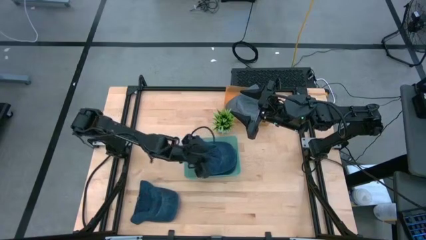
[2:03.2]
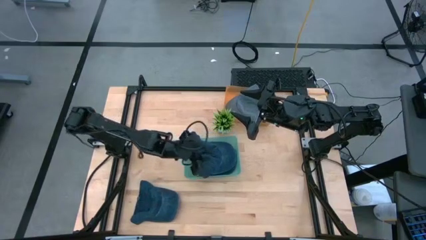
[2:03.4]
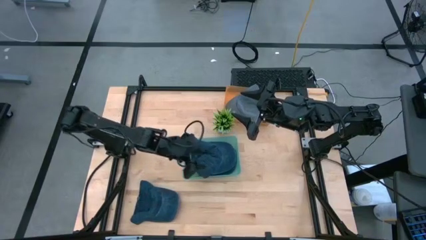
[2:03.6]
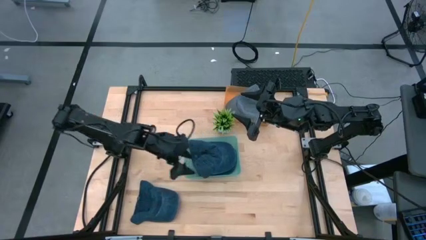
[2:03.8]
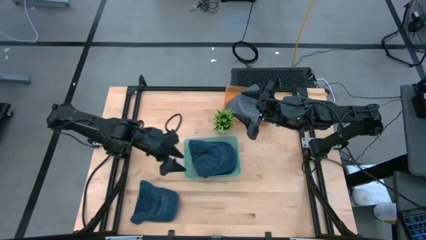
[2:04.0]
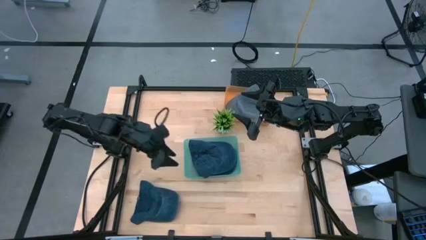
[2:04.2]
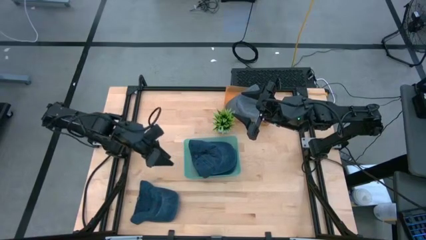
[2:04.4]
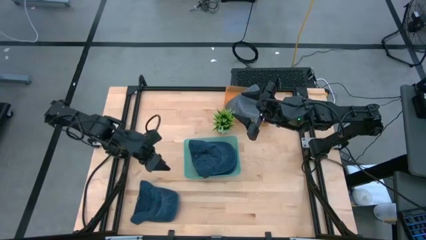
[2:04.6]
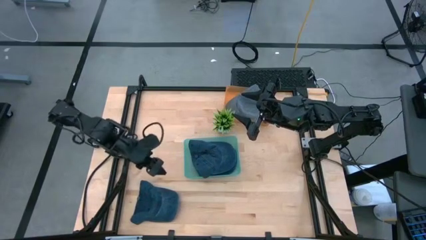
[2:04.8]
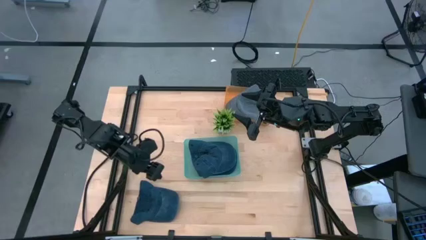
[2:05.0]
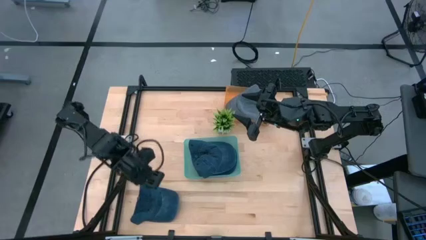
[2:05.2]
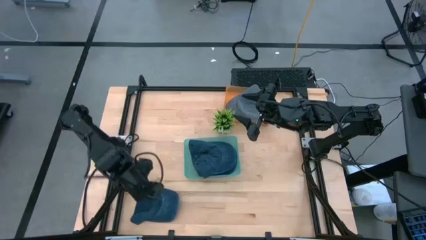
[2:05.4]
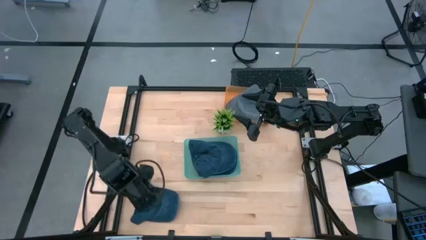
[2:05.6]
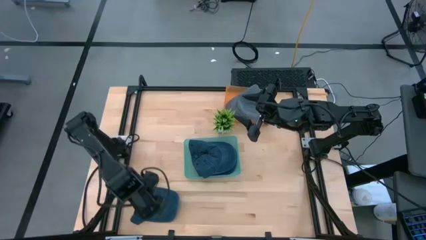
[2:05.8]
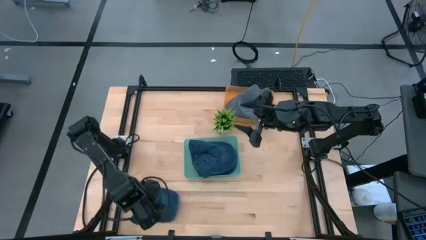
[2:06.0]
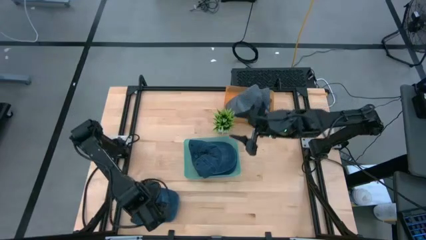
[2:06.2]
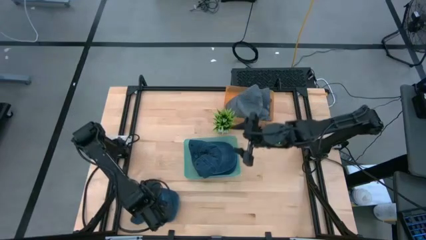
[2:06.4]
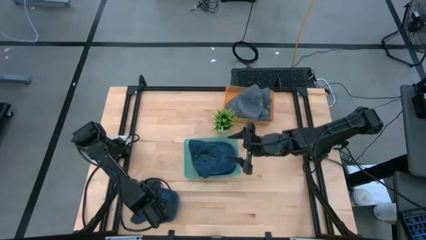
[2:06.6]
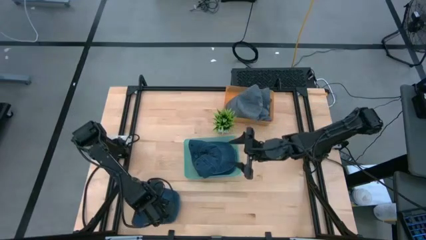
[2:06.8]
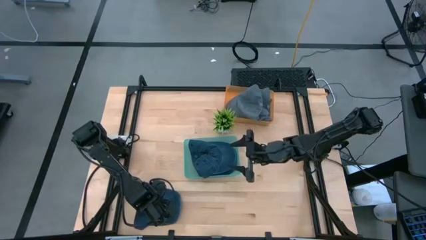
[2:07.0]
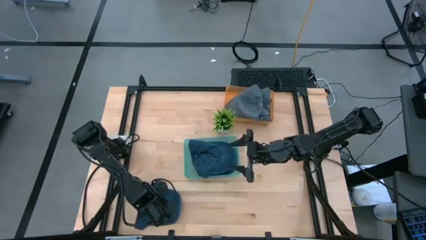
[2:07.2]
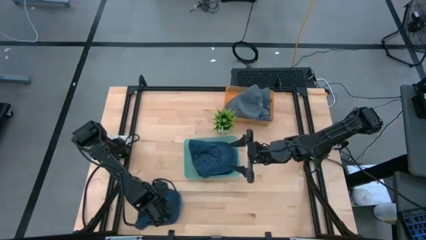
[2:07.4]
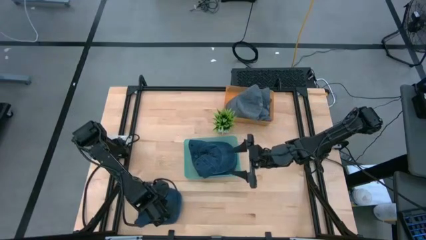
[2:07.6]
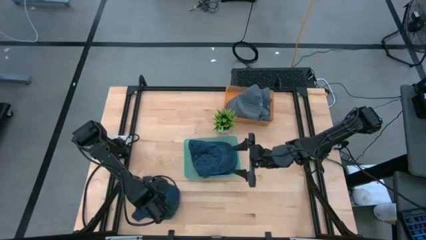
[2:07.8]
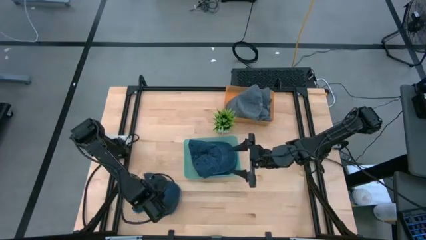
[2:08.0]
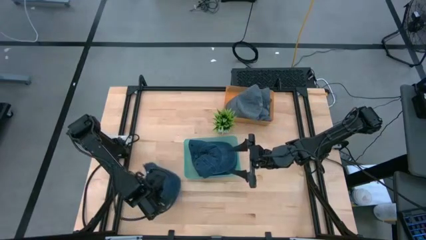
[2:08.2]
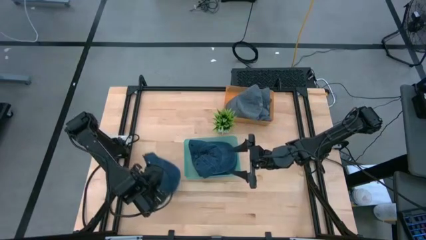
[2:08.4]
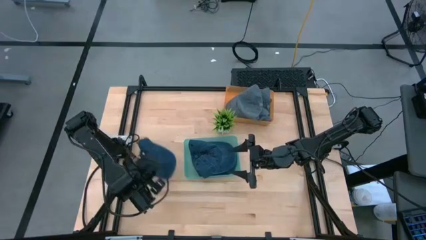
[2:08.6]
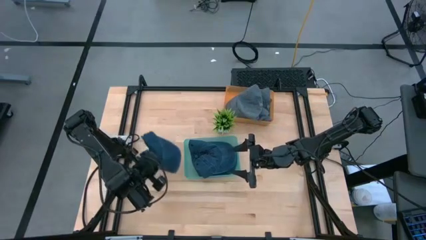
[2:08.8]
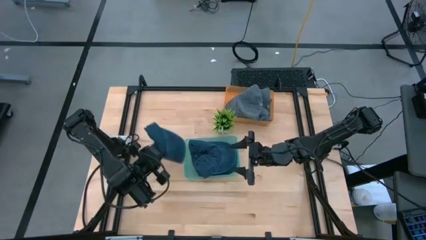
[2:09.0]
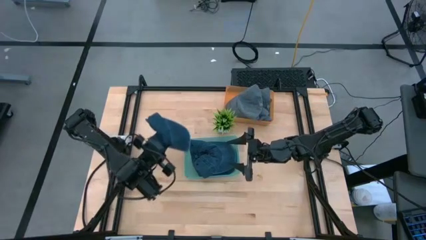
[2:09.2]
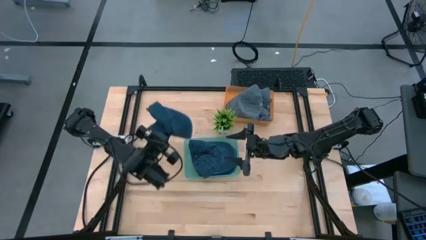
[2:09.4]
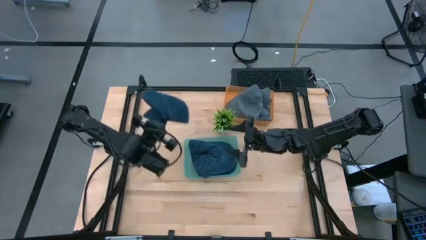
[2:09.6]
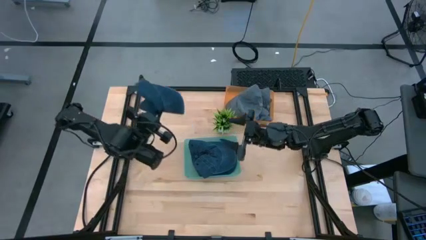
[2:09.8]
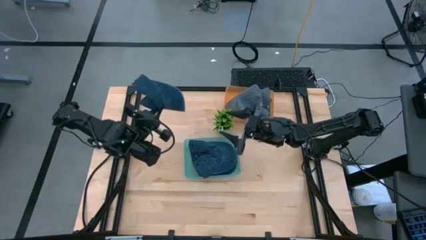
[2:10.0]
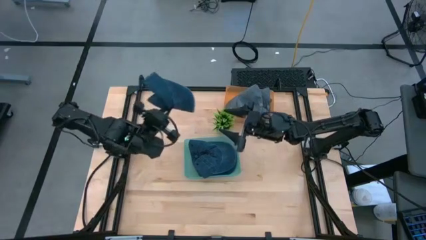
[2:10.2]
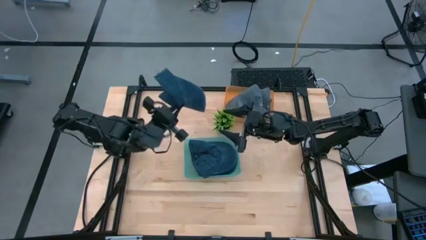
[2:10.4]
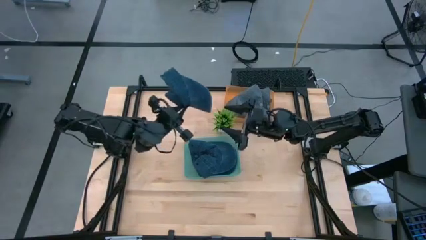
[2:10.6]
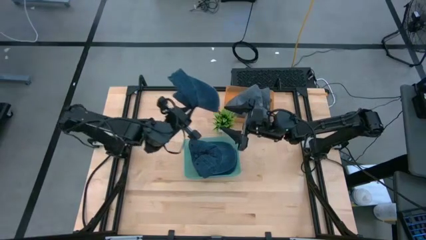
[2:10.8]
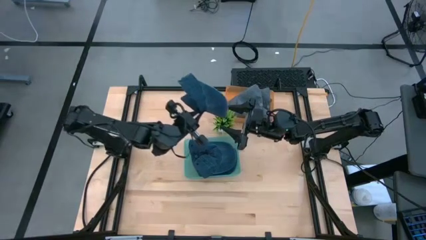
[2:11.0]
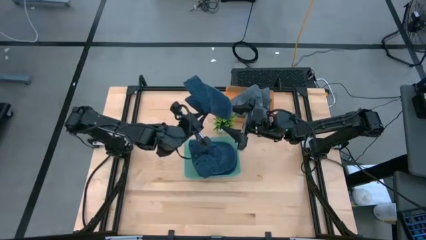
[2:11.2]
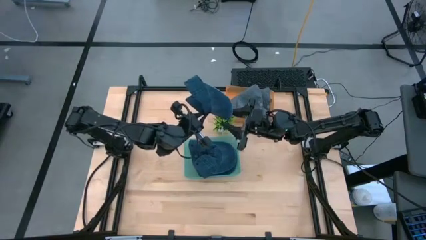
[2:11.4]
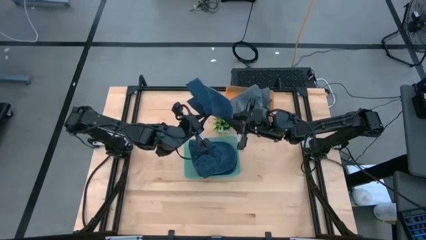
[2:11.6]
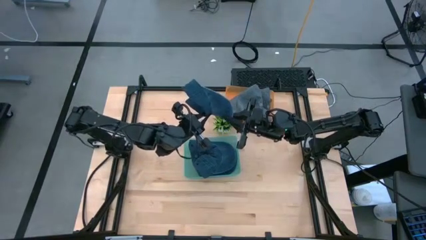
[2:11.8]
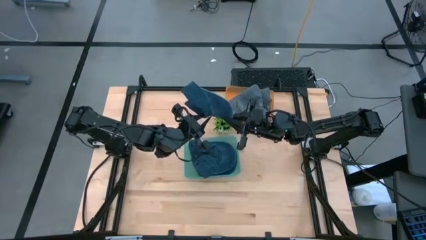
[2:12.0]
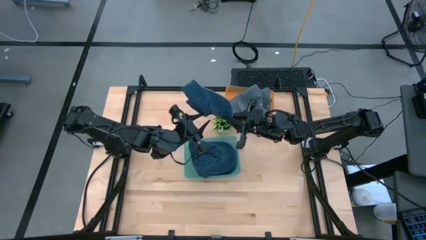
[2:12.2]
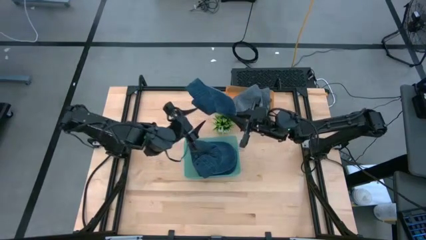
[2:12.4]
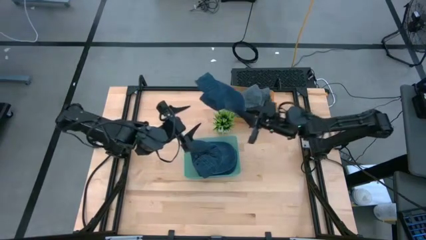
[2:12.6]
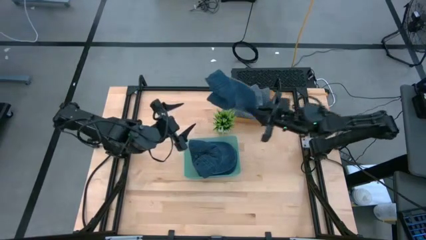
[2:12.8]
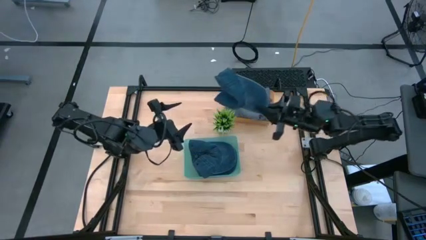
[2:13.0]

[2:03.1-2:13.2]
Task: Pick & Place hat
Put the blue cap into the green bin

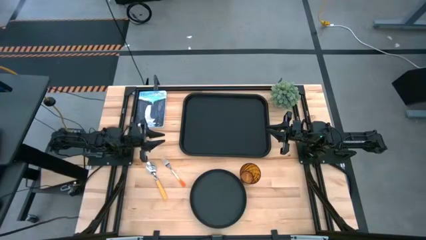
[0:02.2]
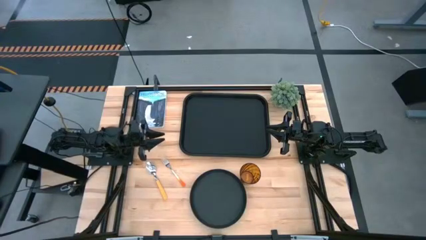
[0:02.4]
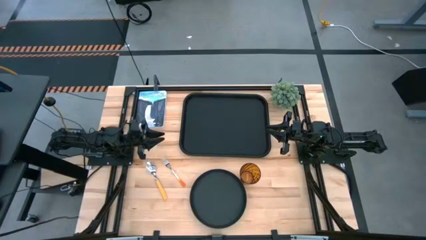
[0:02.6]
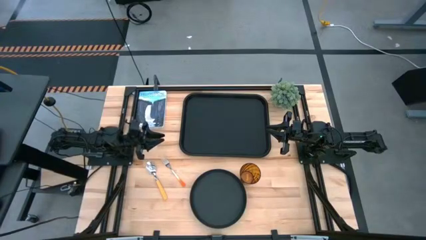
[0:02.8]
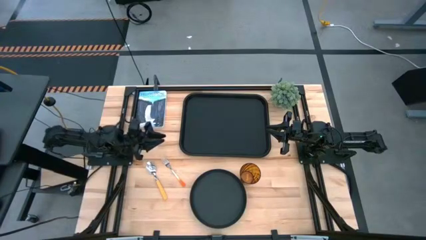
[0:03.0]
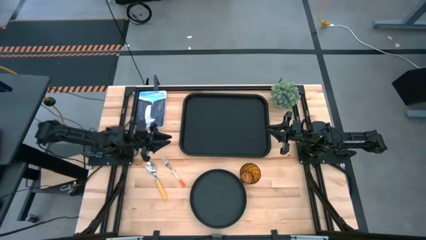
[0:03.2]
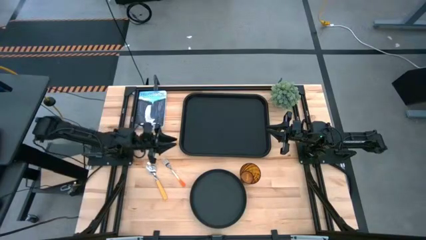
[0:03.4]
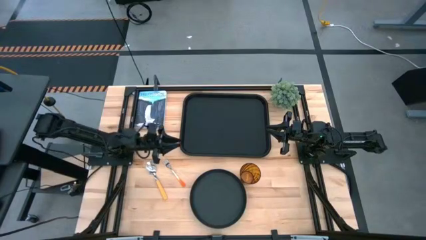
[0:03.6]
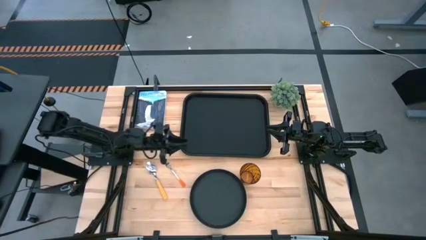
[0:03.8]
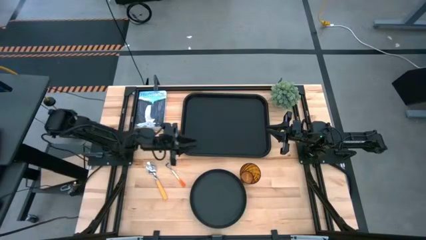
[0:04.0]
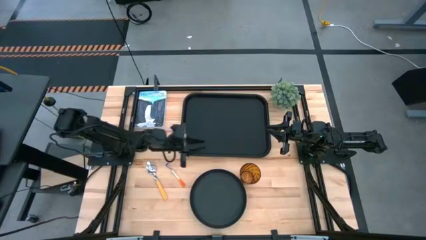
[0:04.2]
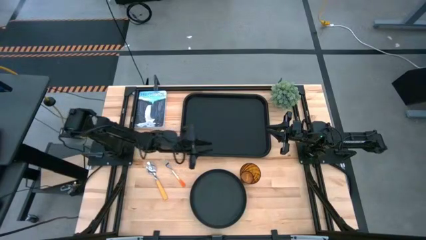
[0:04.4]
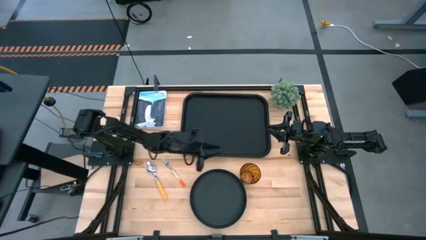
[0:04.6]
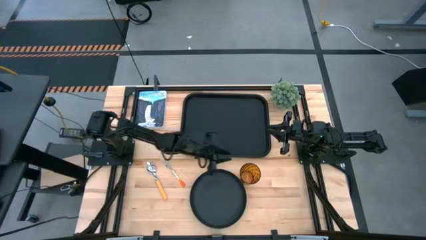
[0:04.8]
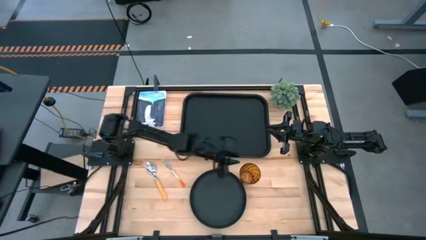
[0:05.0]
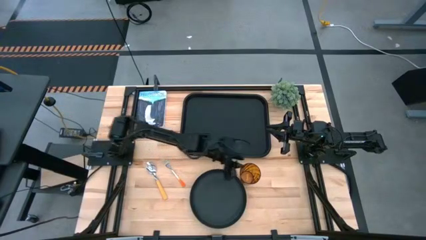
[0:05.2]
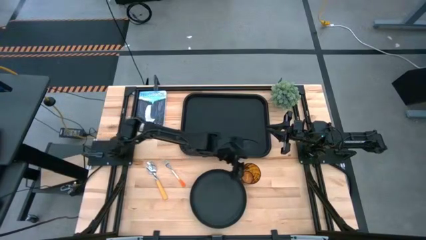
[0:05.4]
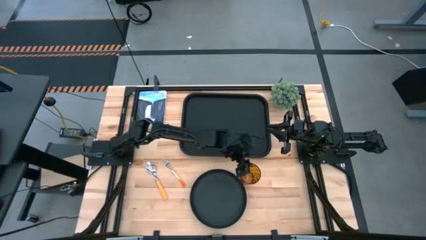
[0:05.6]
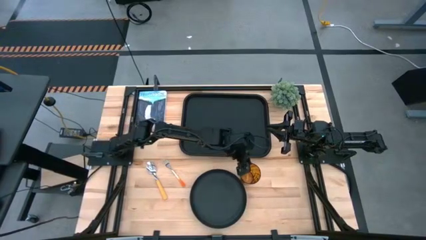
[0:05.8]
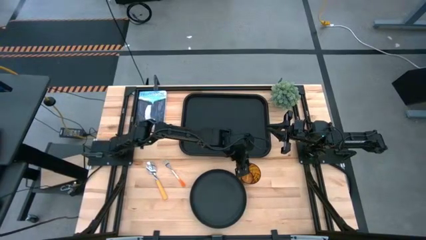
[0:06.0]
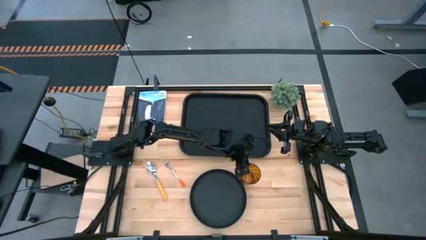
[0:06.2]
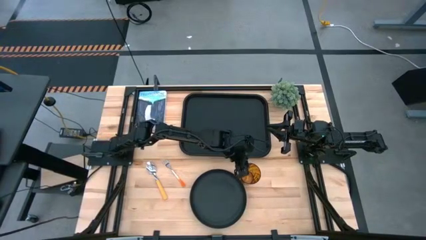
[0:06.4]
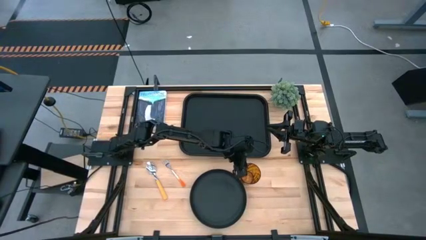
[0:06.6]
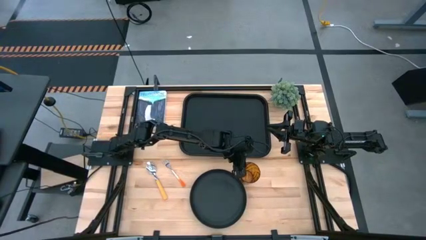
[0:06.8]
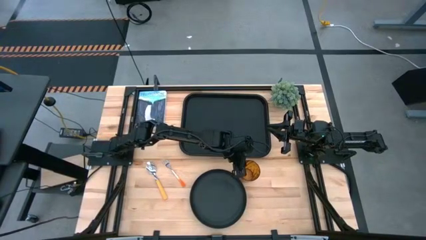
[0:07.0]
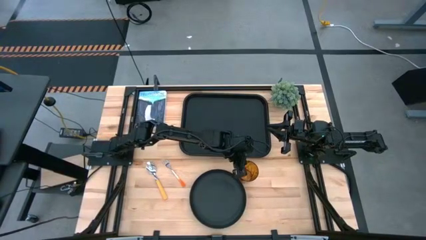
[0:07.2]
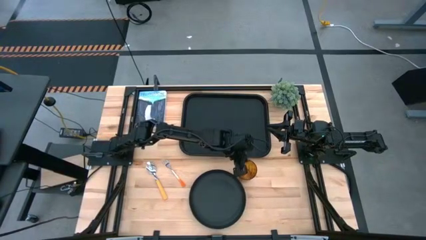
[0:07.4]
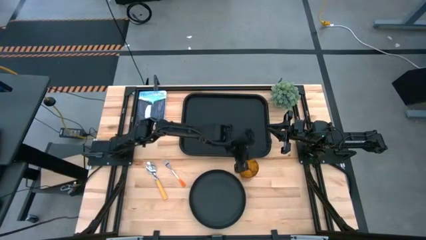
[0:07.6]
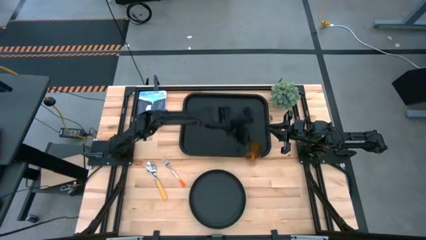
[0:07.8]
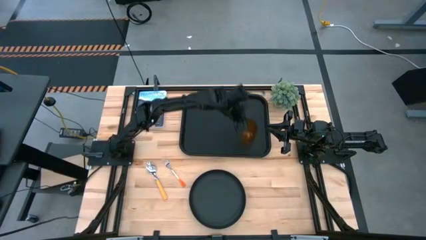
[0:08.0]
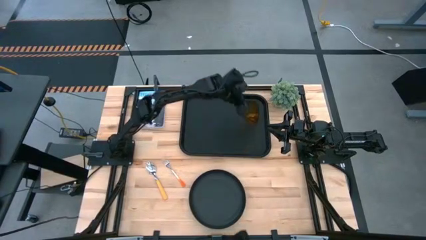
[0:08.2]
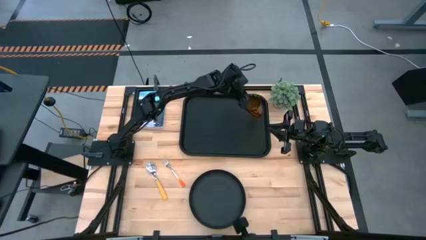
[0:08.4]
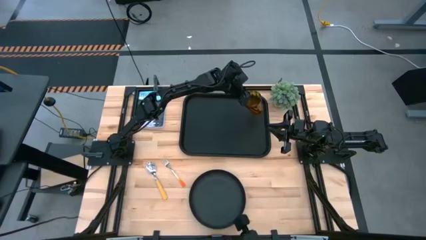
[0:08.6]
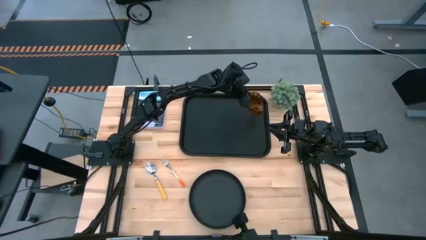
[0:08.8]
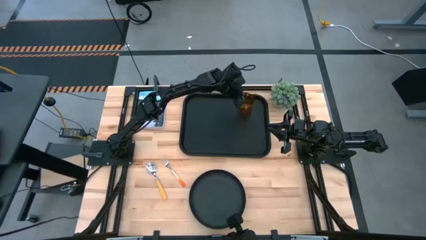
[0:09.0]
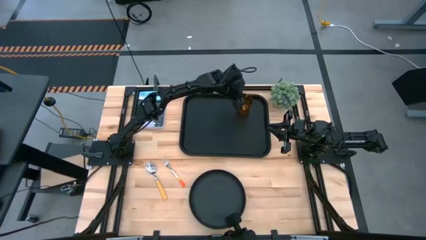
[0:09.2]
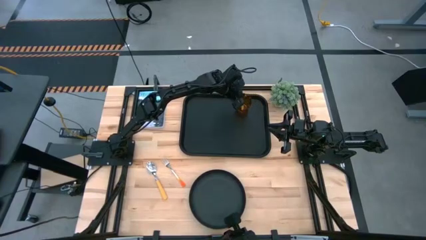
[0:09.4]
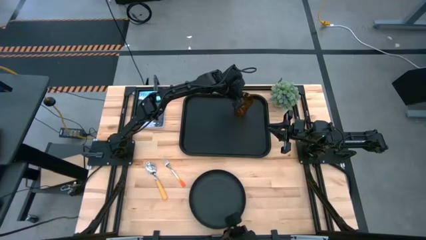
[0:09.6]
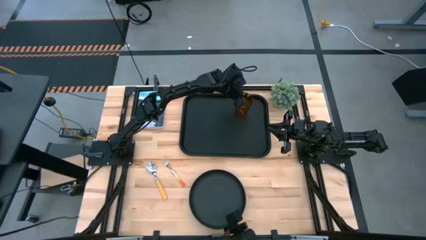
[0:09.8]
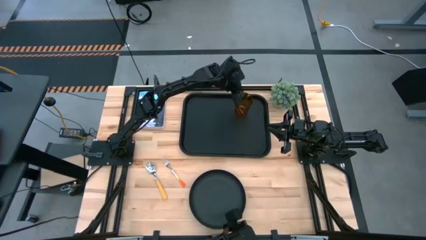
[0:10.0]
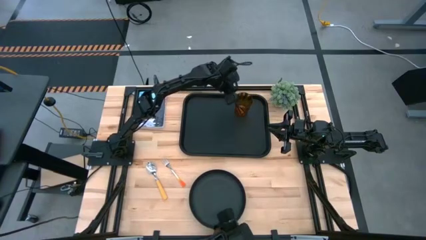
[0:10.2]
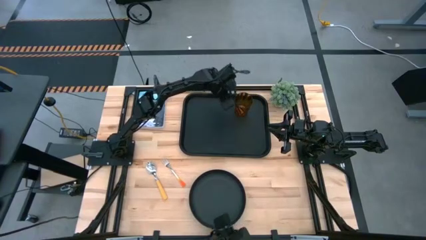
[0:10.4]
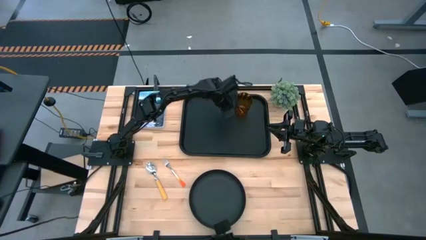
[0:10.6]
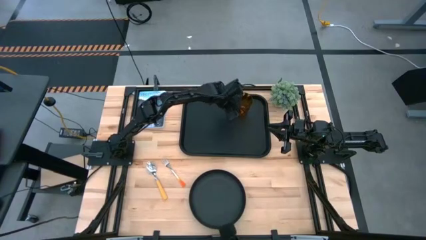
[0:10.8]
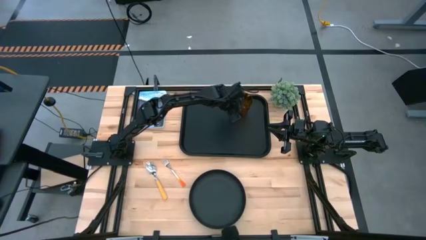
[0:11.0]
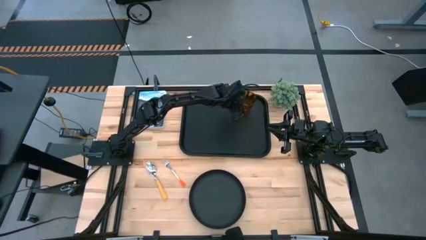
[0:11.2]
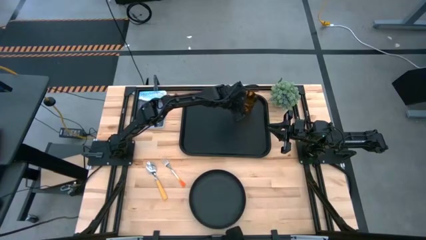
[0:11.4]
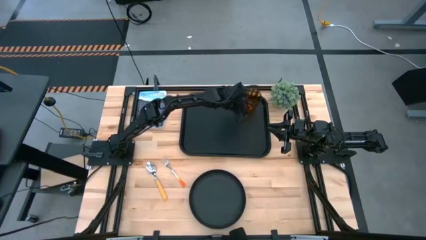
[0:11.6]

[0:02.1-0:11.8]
Task: Pick and place plate/cup/fork/spoon on tray
Put the yellow glass on the black food tray
